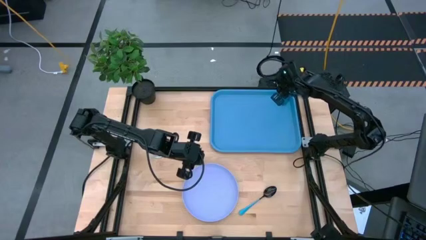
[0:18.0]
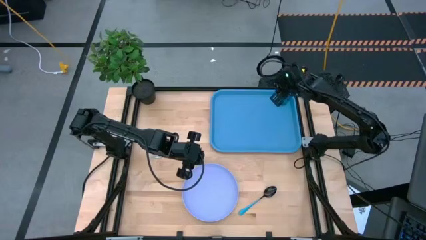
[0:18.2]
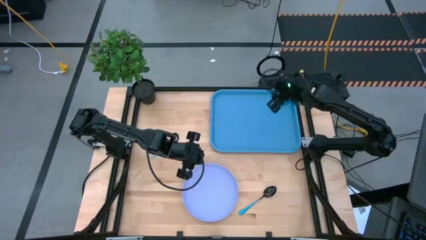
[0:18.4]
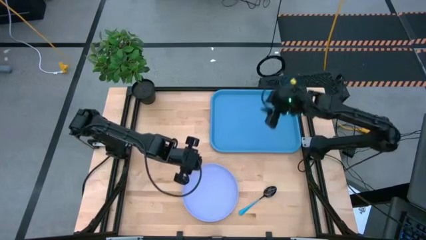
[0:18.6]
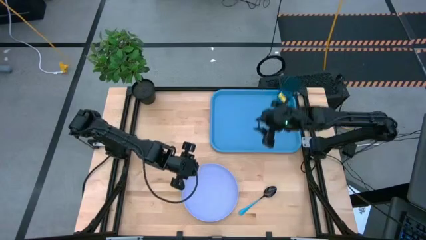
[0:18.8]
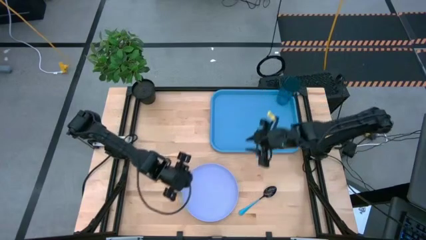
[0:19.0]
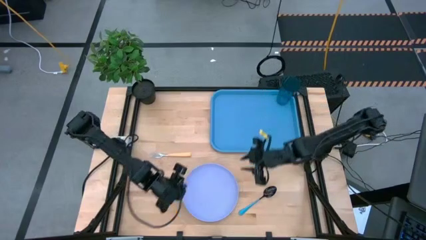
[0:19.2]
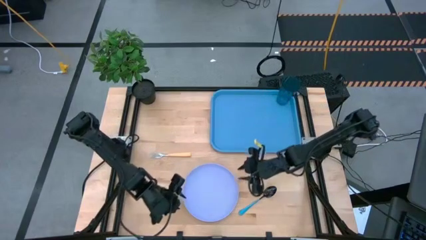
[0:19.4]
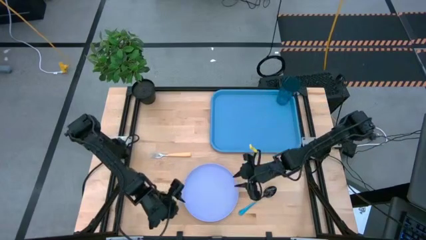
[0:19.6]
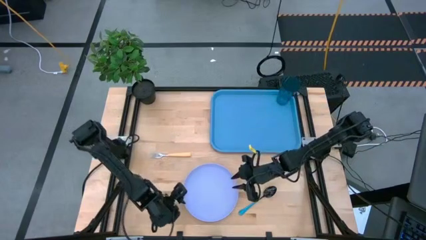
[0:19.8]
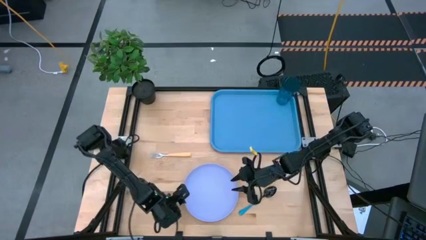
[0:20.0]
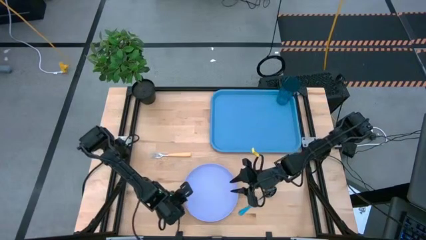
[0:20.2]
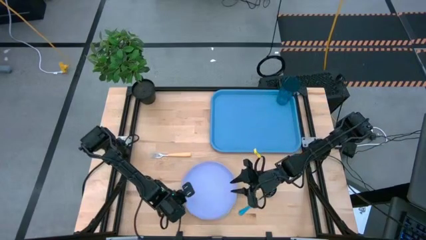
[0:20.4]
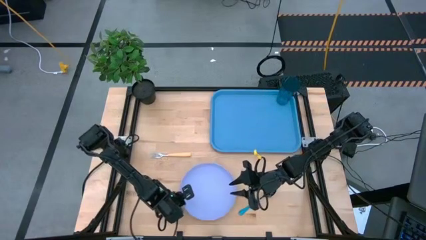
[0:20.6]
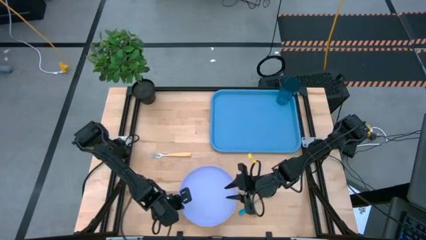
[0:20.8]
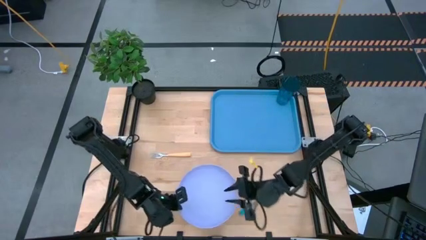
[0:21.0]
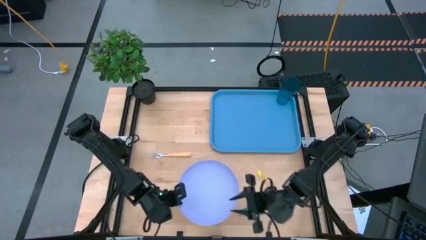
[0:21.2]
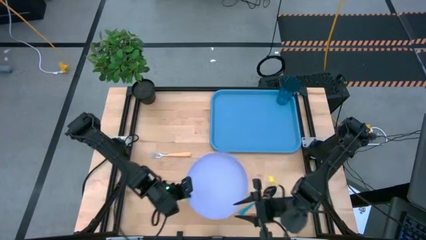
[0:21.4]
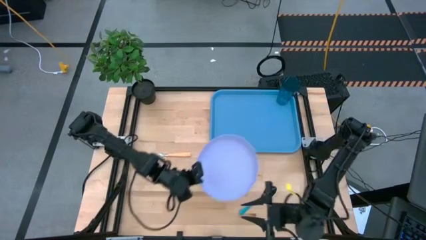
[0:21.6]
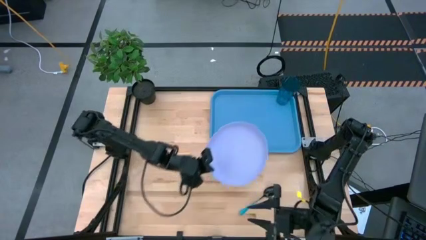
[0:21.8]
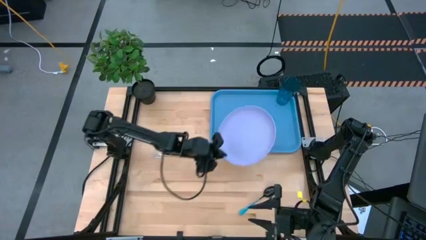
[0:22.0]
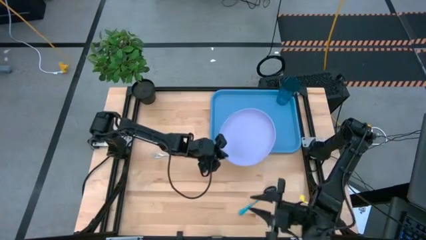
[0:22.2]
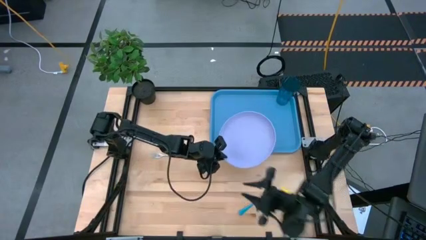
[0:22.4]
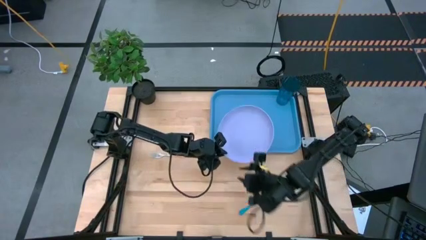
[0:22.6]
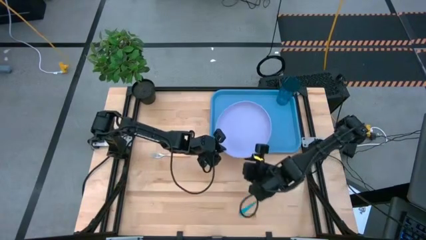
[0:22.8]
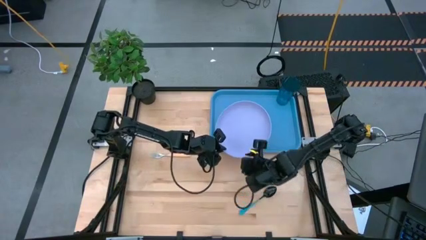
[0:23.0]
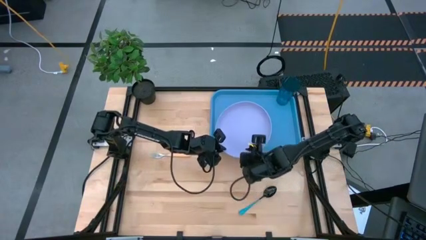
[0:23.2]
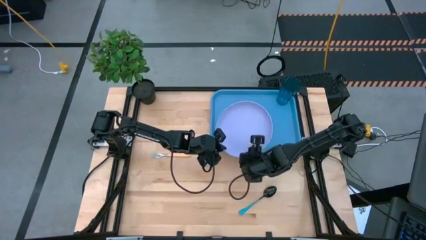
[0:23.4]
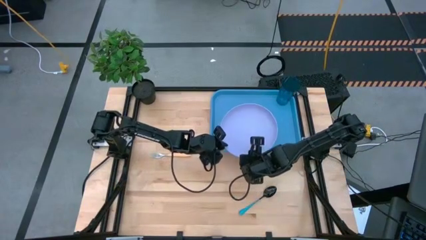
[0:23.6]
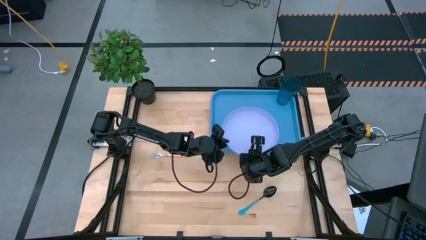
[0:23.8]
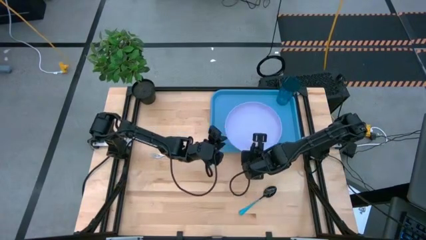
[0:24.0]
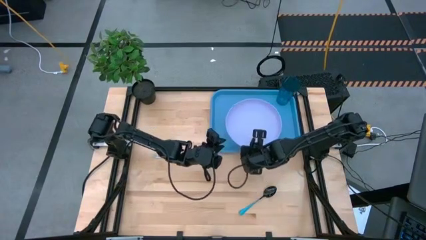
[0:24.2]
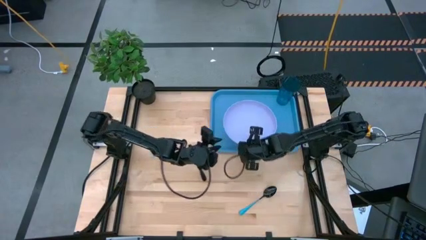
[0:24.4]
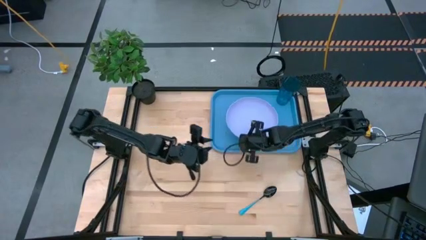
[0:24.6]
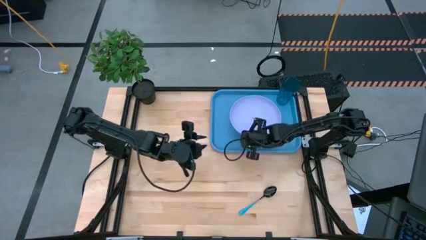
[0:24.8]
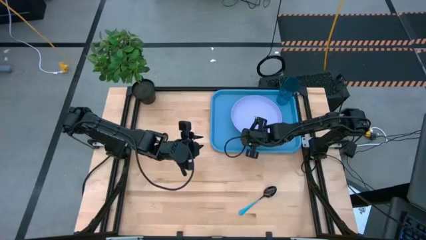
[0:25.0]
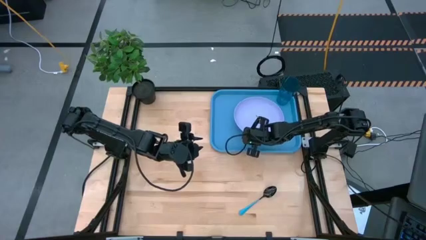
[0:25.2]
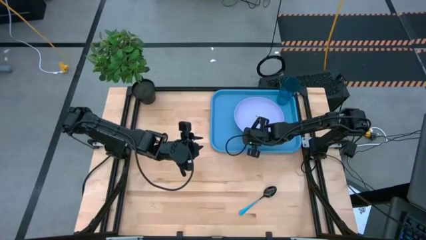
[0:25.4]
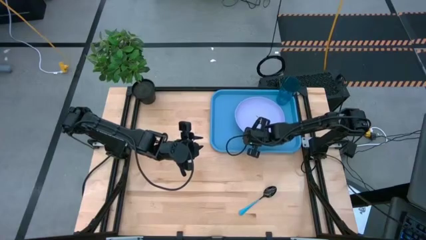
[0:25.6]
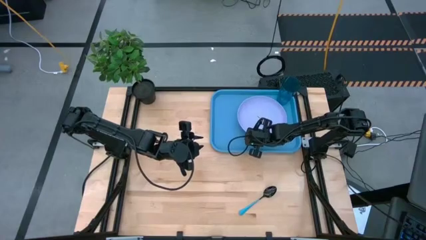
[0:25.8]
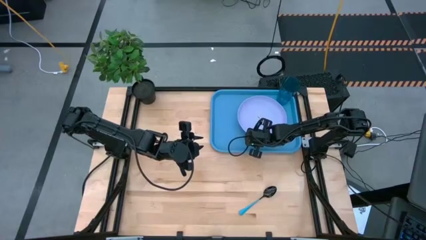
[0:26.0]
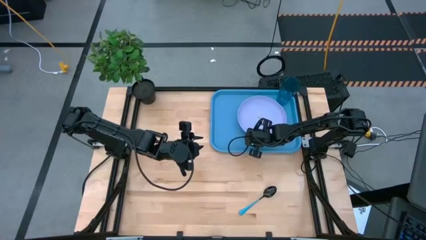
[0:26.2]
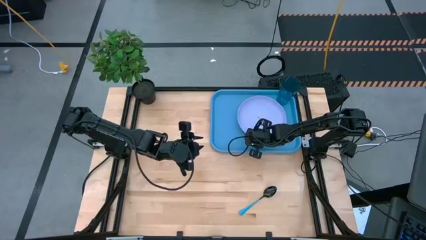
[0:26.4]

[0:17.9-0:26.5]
Task: Pick and place plate/cup/fork/spoon on tray
Put the purple plate on the blue tray to the bottom right of the blue cup

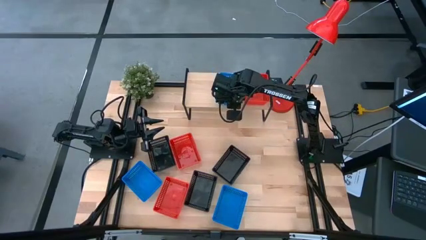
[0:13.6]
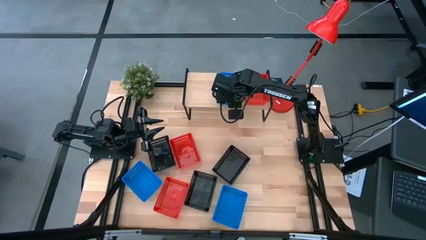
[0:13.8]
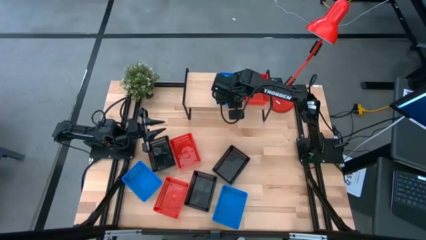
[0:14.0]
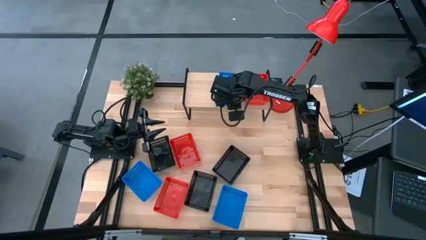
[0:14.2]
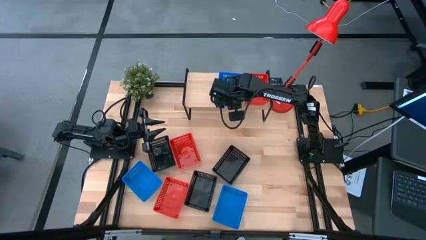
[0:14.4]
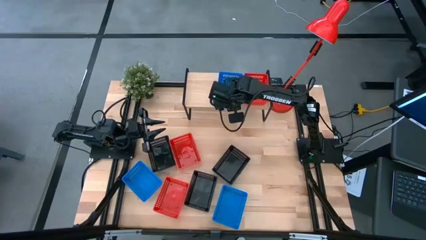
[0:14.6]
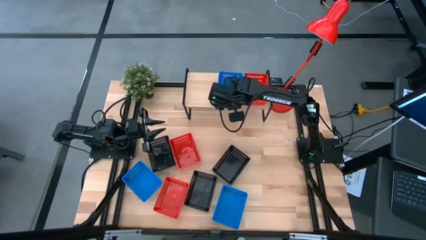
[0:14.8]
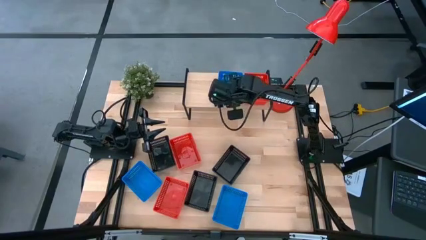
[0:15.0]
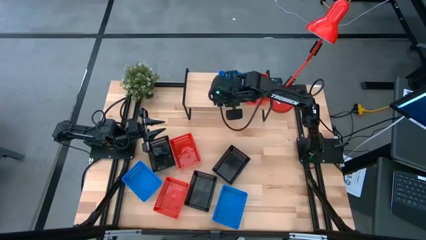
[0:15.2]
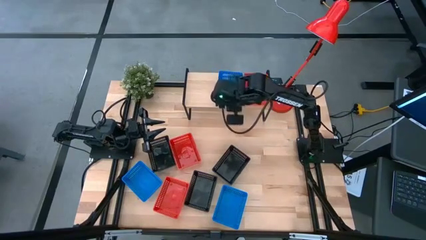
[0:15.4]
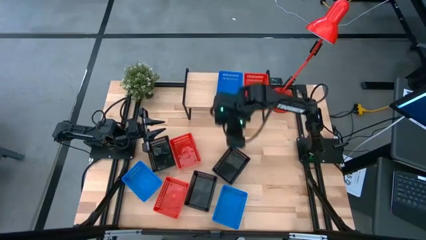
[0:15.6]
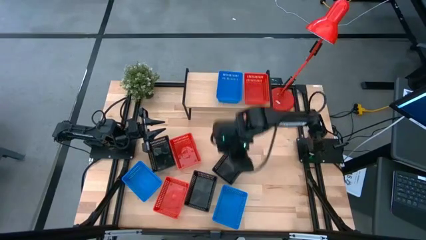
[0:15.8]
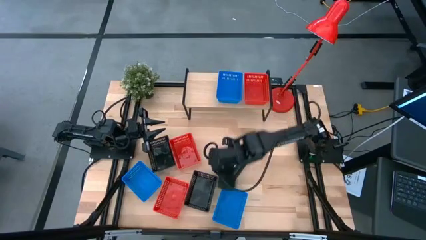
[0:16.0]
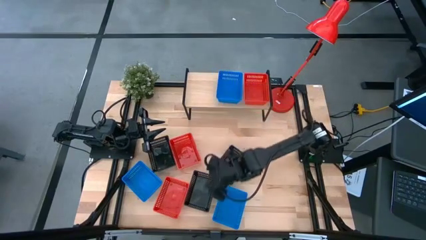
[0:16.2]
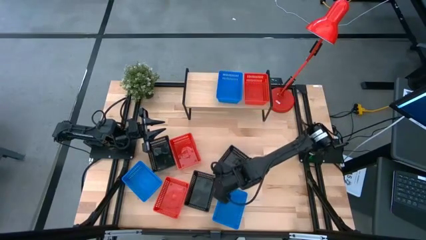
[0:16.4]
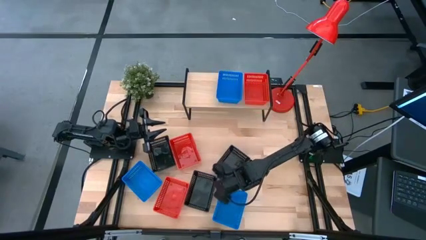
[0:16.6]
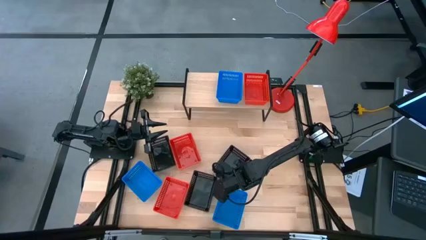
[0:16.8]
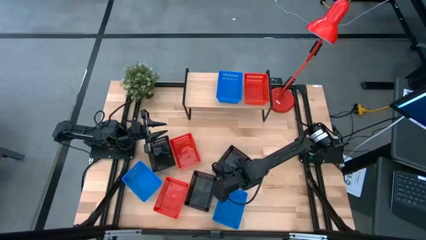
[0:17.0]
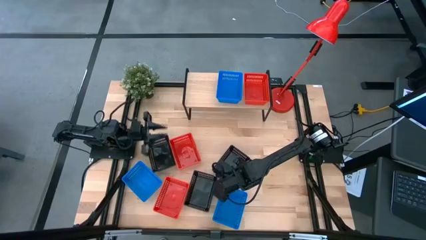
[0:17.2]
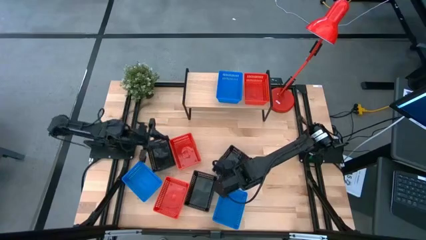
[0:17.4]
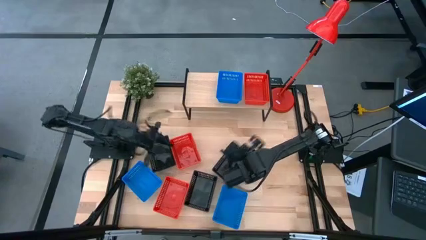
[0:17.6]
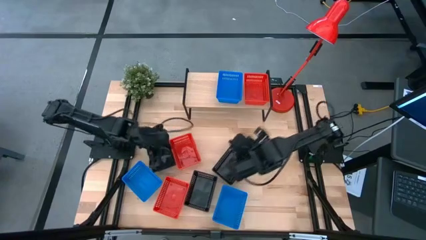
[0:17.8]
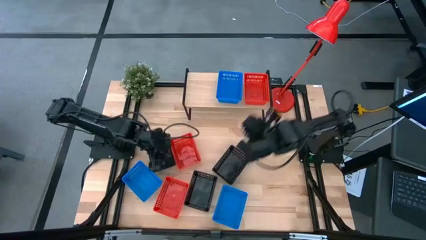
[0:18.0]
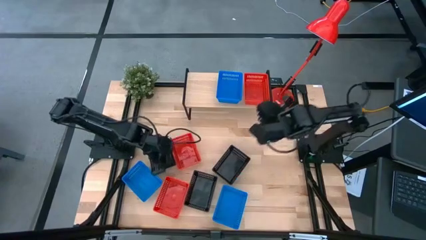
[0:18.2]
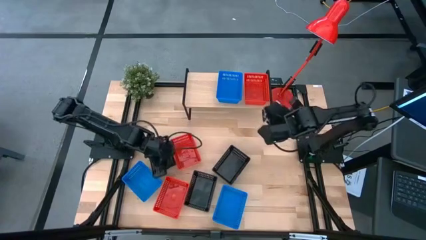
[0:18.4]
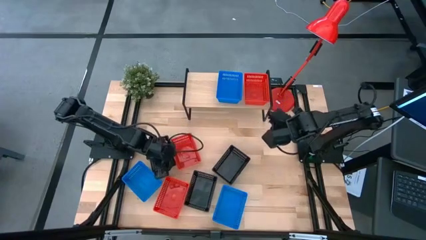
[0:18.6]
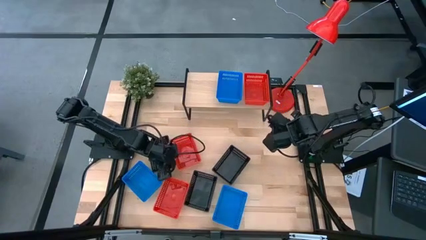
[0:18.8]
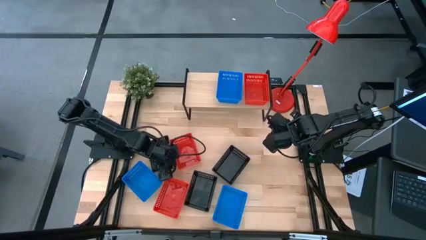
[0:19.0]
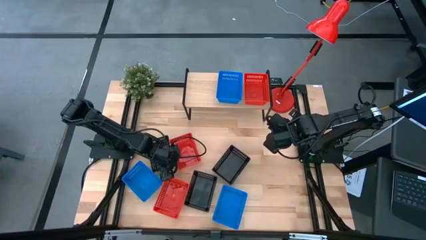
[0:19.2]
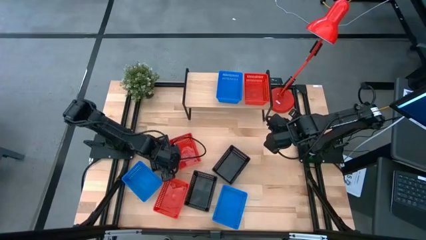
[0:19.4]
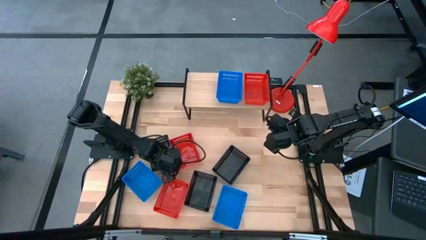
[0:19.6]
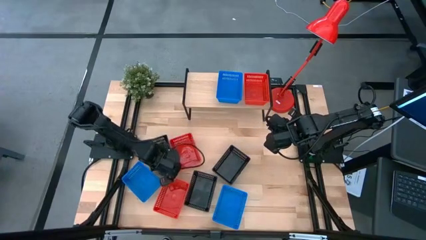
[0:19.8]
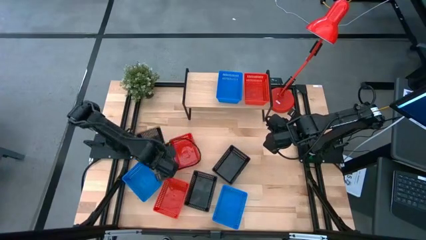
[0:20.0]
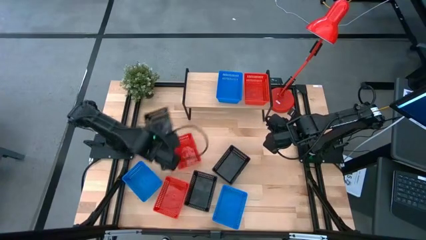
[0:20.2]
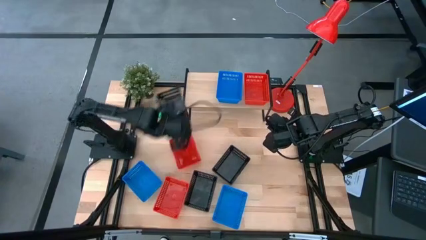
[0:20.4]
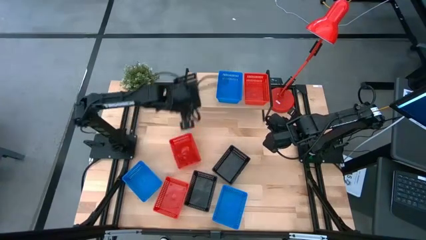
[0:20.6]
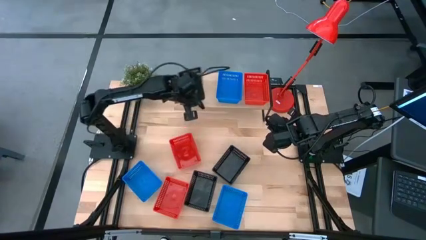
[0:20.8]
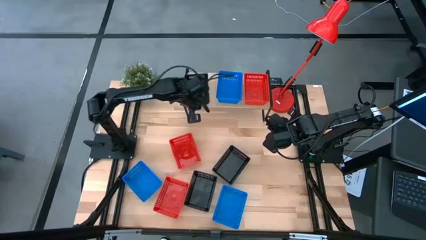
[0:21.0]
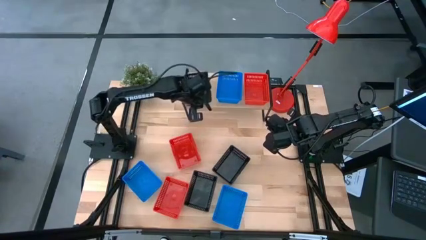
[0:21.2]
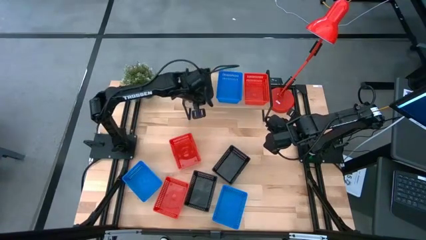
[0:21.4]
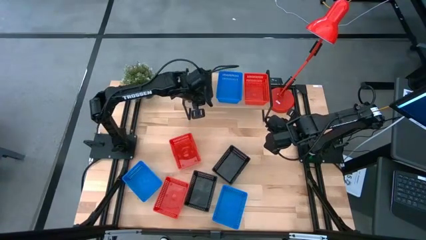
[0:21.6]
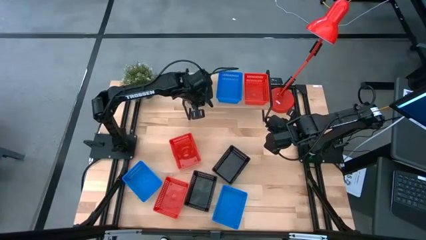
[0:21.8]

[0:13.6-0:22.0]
Task: Stack baskets on shelf by color
Put the top left black basket on the shelf
